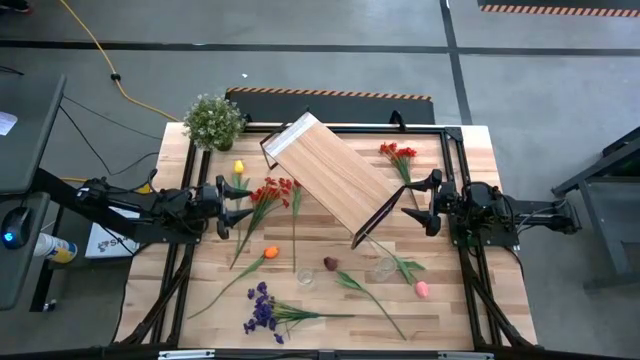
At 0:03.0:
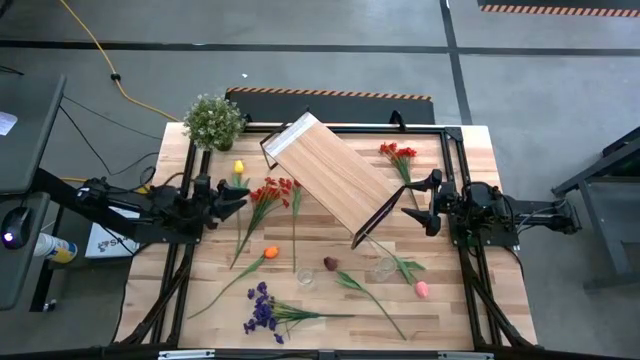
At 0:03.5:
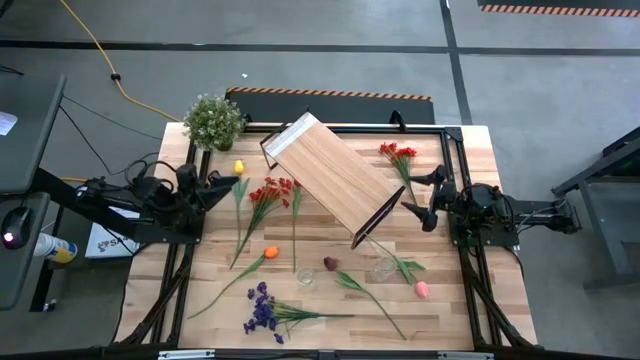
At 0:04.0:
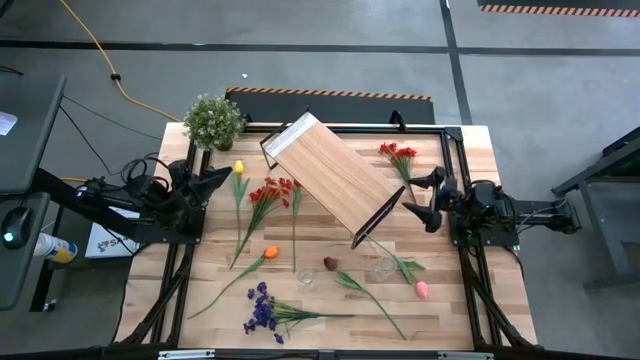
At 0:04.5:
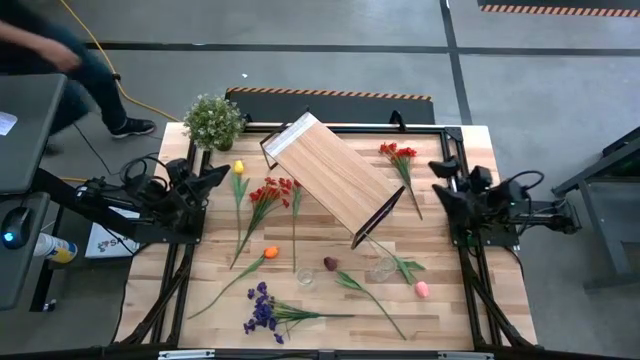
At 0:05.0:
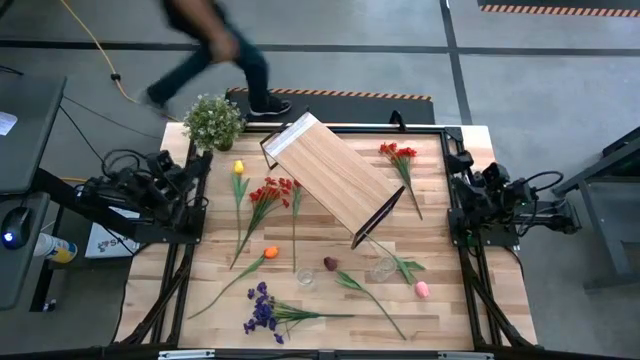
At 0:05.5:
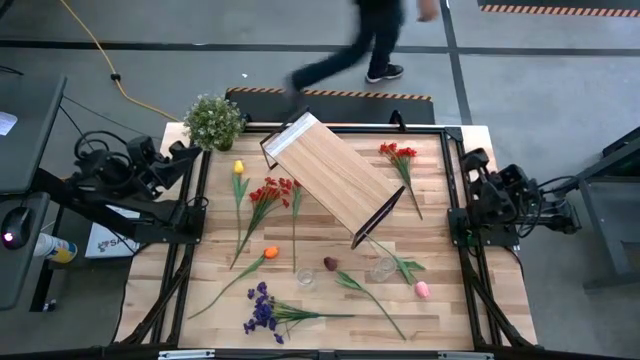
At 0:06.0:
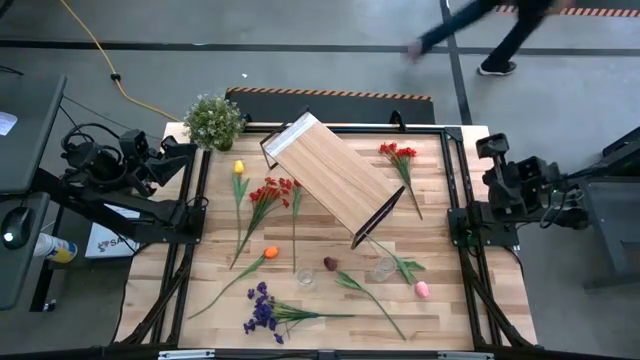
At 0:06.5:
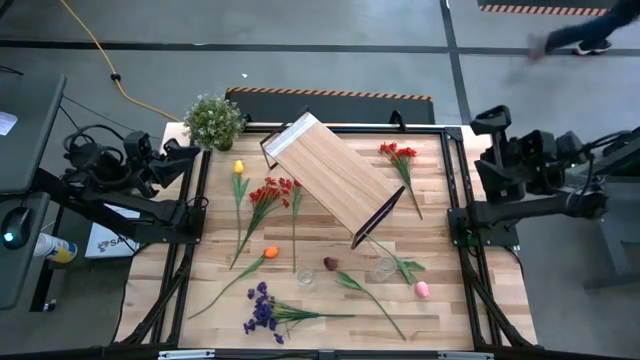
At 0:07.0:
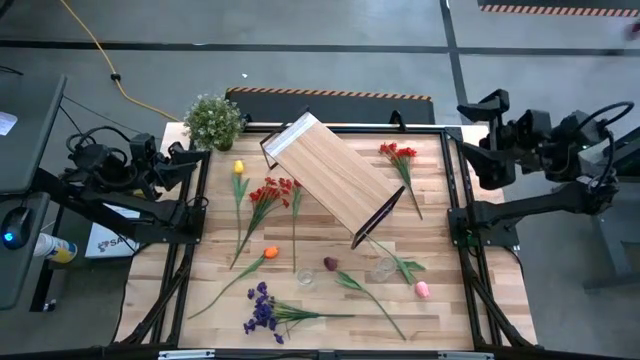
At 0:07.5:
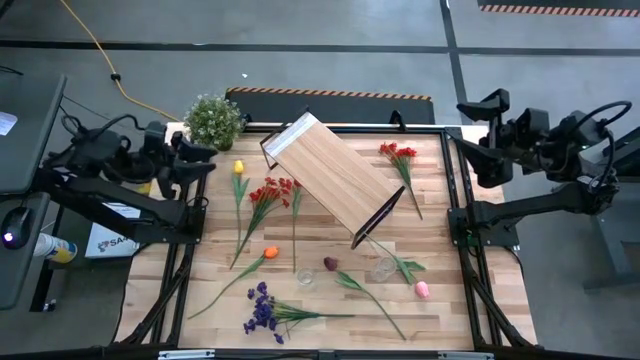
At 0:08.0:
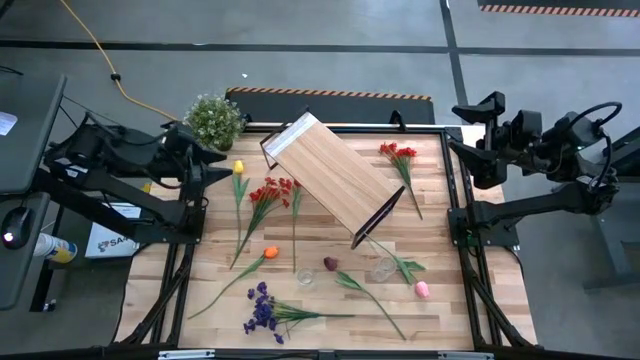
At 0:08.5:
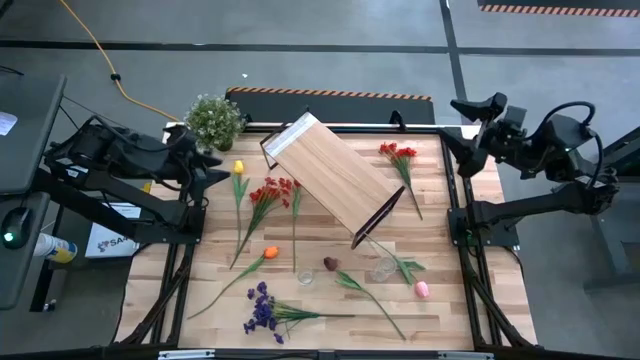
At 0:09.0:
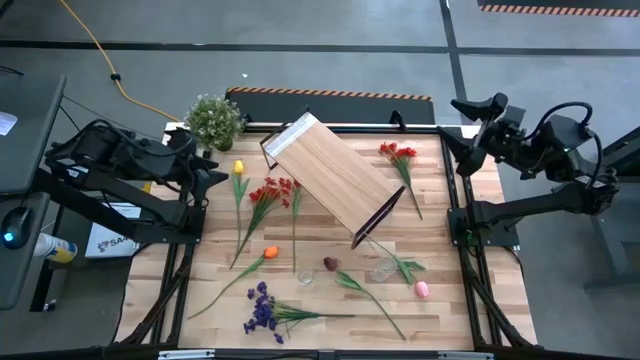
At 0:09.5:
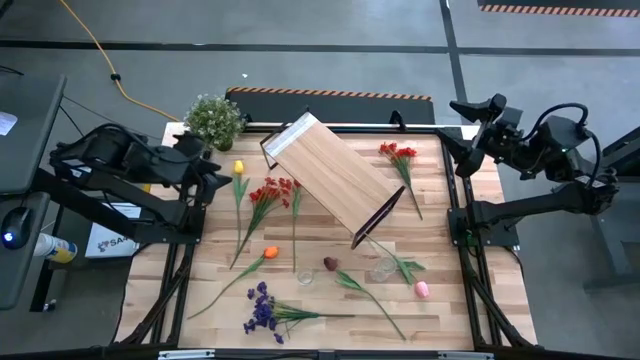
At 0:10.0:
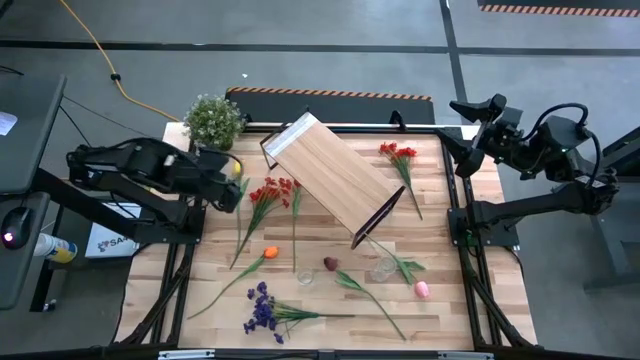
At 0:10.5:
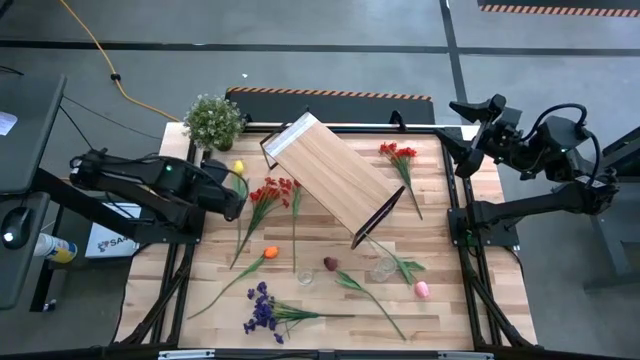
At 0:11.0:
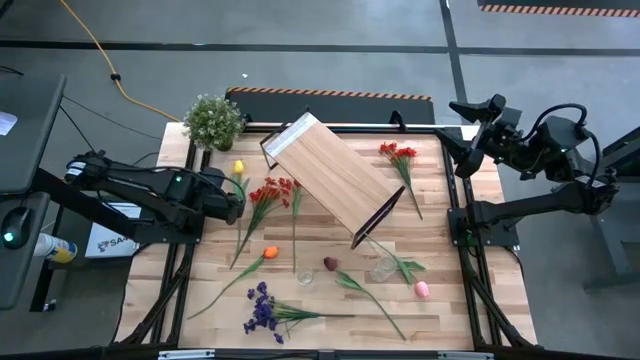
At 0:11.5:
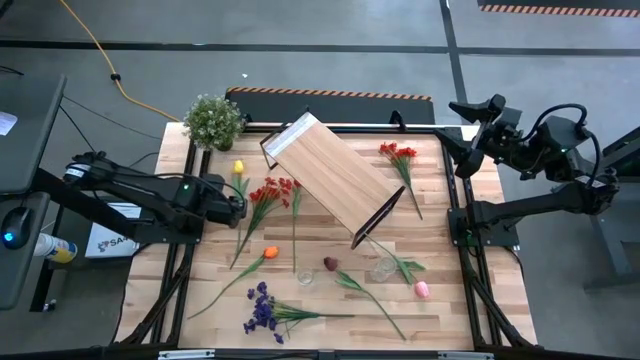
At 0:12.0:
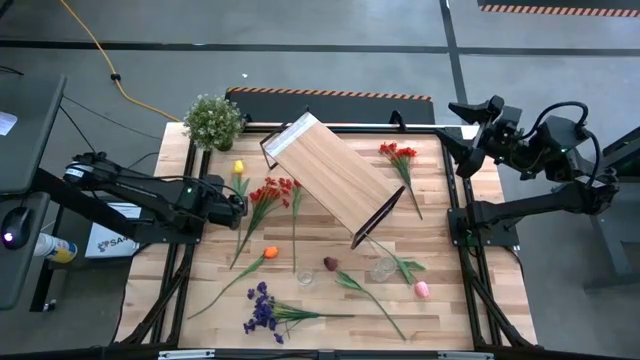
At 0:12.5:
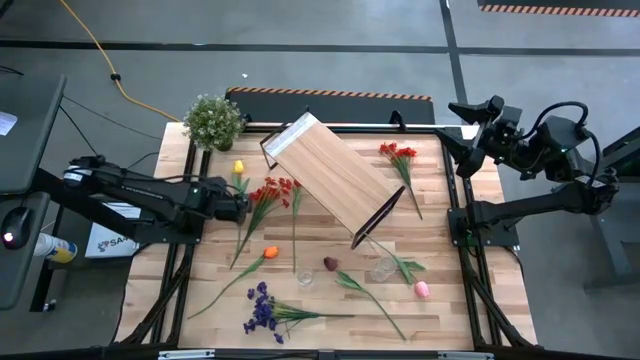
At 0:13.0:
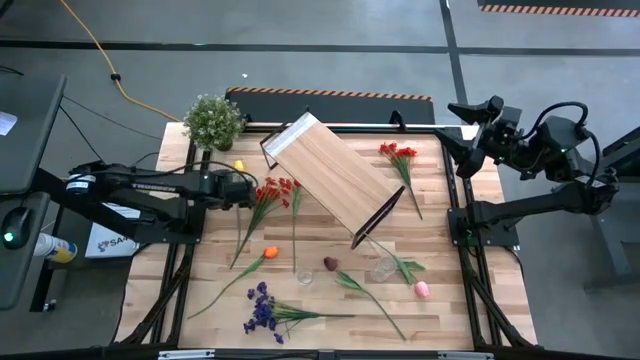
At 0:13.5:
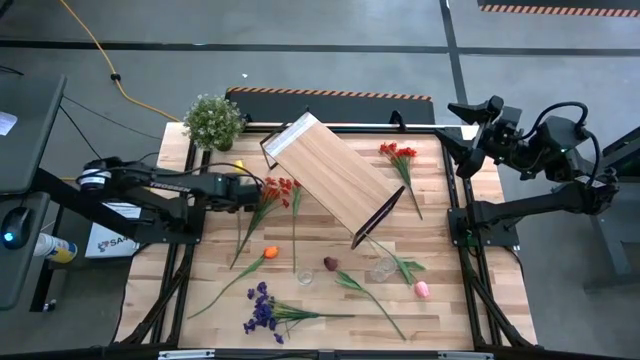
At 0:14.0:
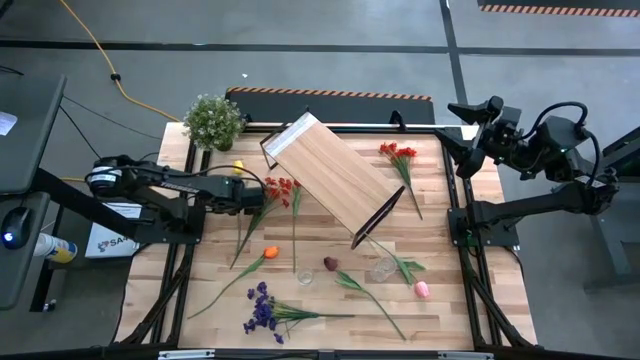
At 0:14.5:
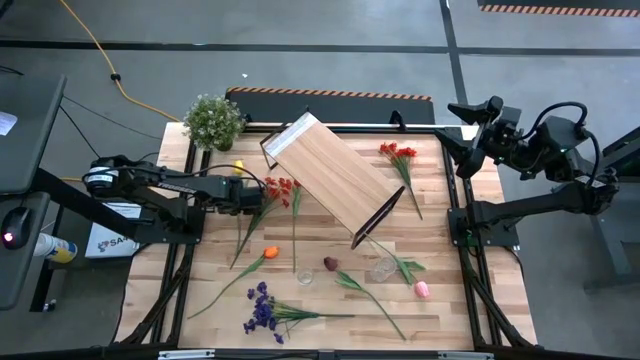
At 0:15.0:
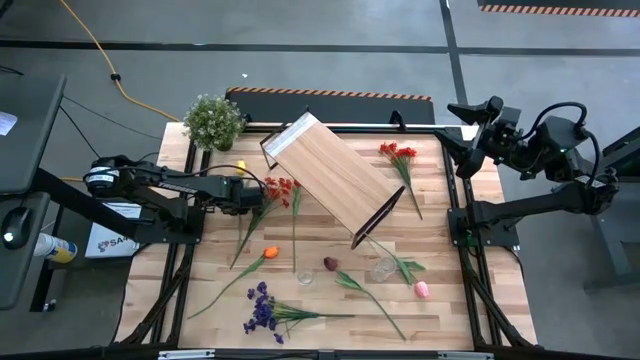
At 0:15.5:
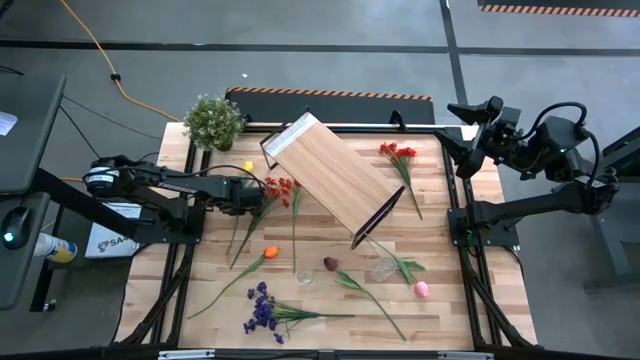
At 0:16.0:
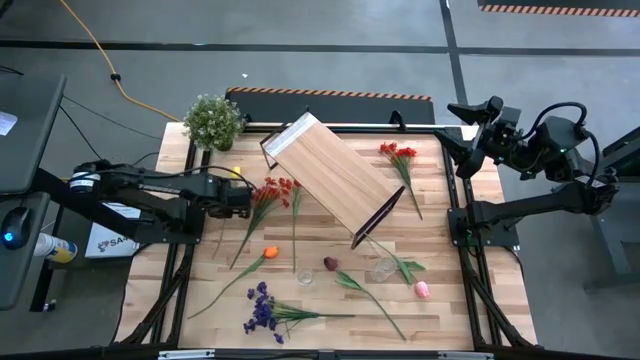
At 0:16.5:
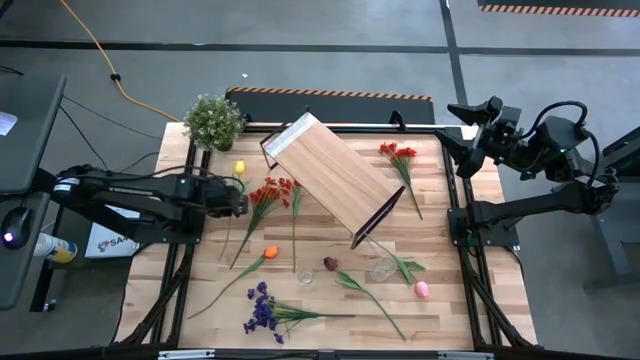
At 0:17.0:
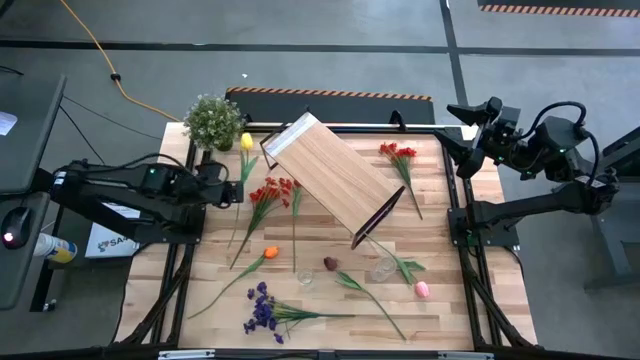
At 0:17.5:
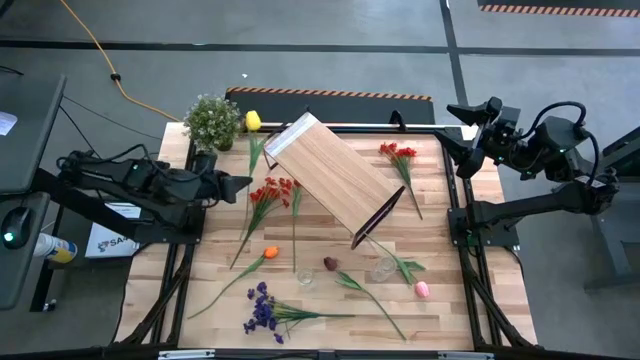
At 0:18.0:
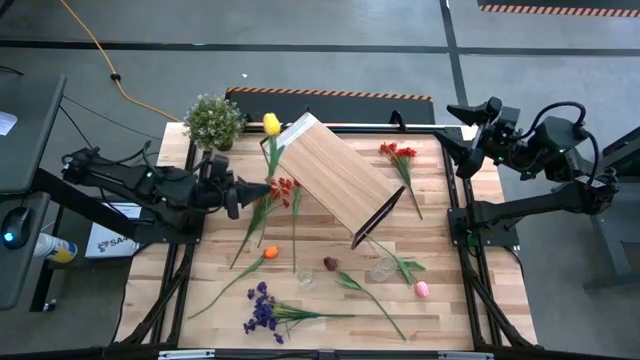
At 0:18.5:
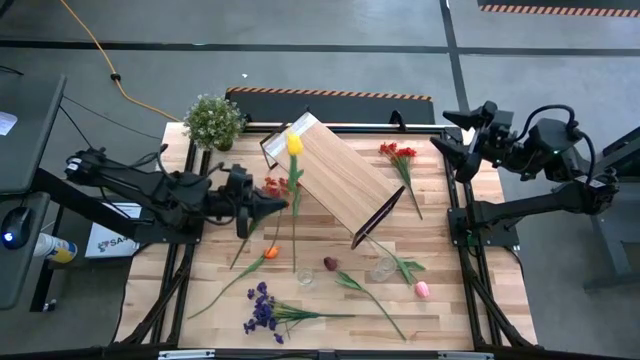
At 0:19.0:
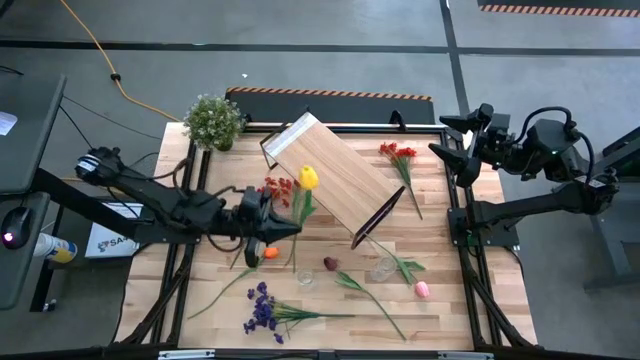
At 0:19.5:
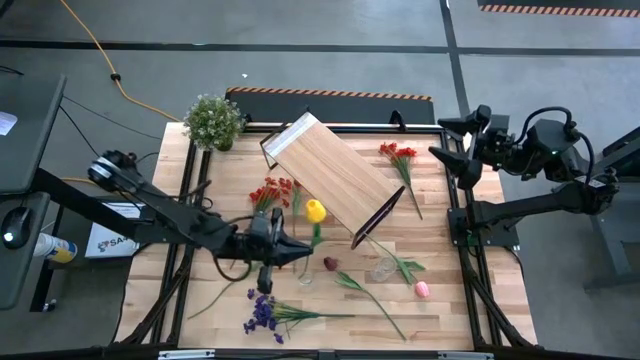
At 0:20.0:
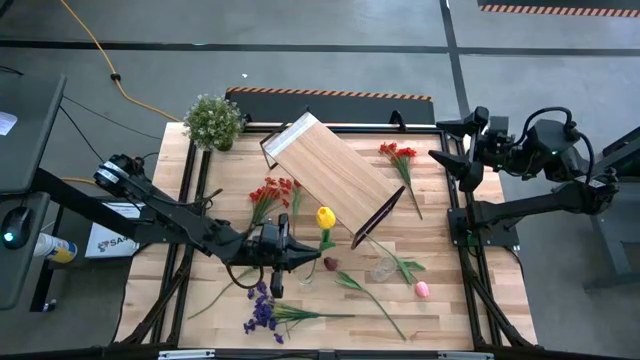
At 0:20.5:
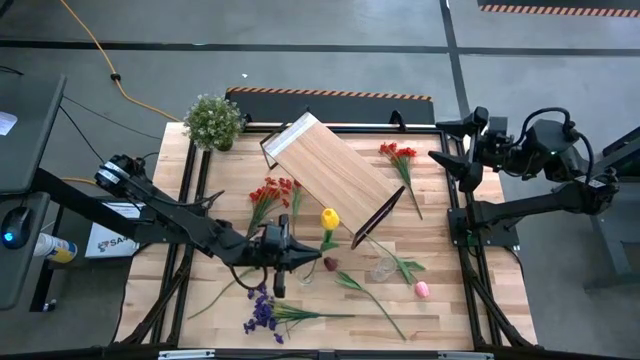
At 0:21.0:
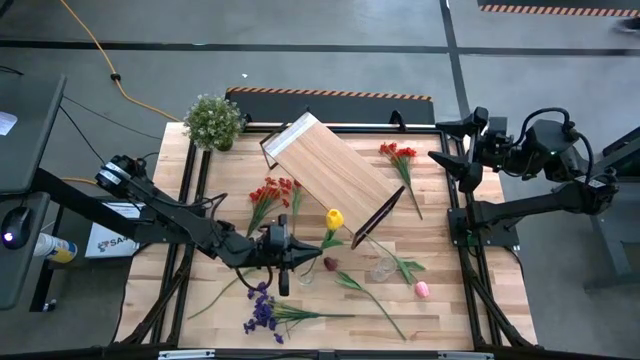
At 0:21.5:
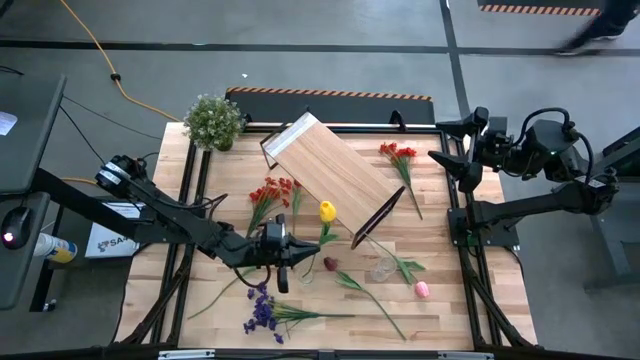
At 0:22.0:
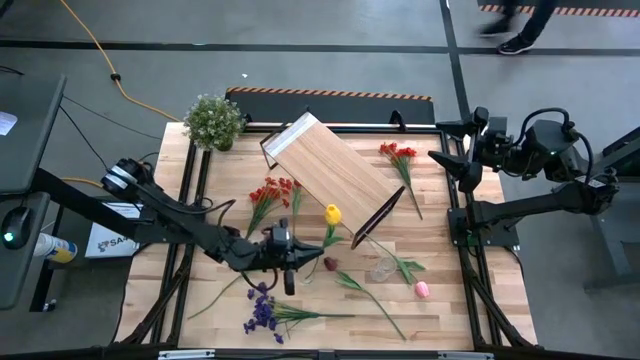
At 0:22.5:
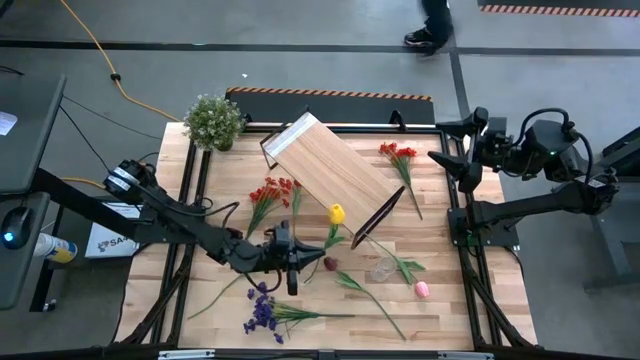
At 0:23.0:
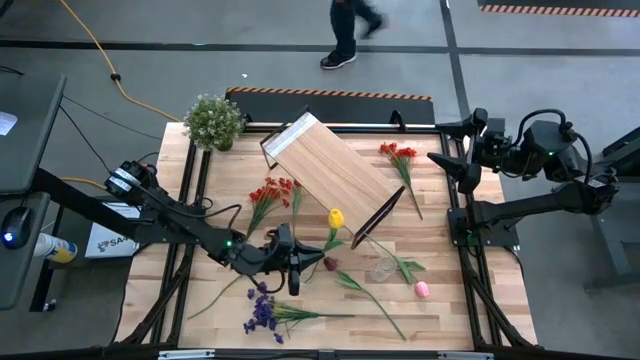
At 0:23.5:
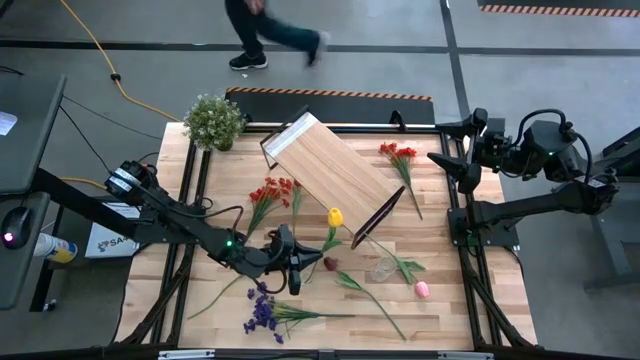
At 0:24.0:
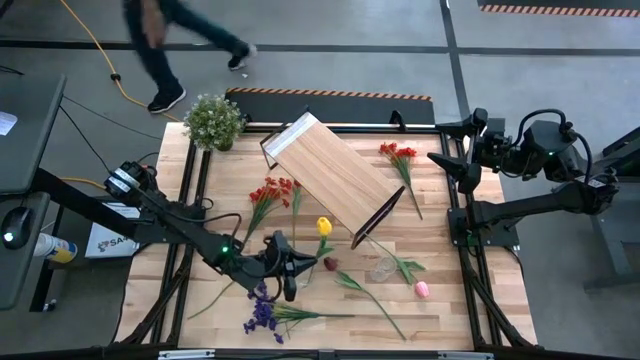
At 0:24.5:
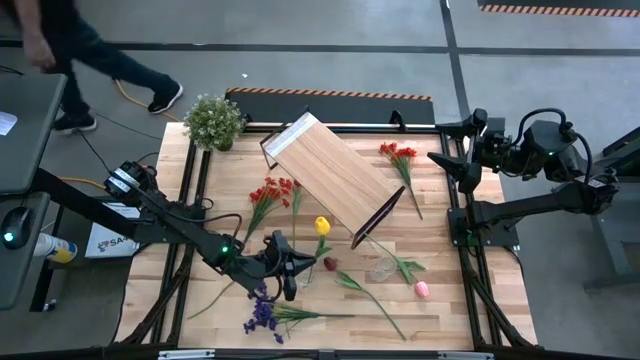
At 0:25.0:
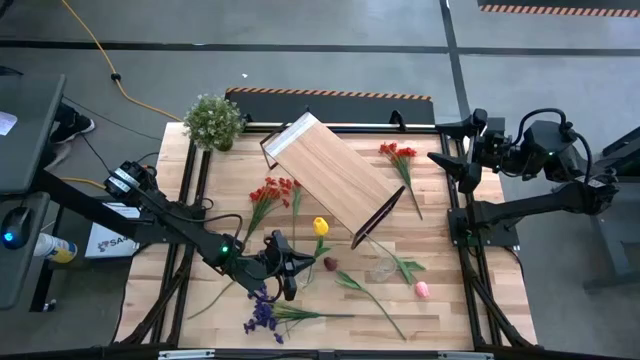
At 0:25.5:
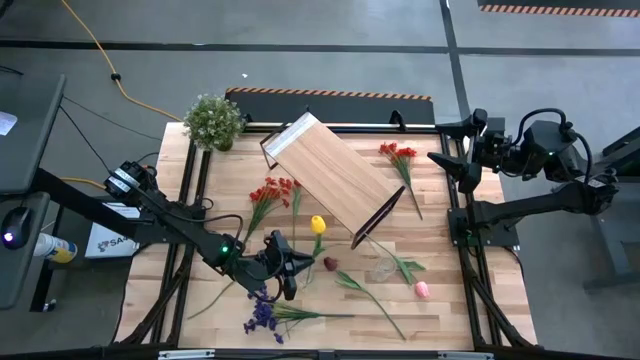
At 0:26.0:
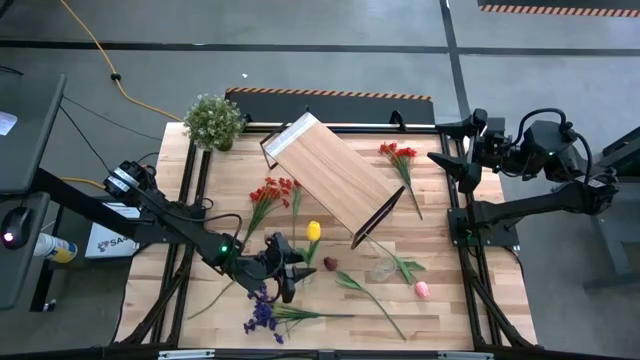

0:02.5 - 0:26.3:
Task: Pick and place flowers into a vace then onto a shelf
Put the yellow tulip into the left transparent vase
